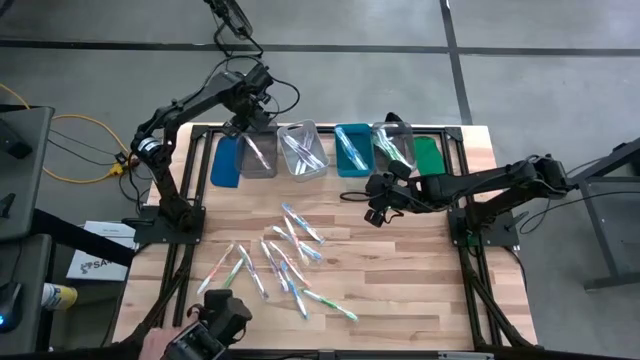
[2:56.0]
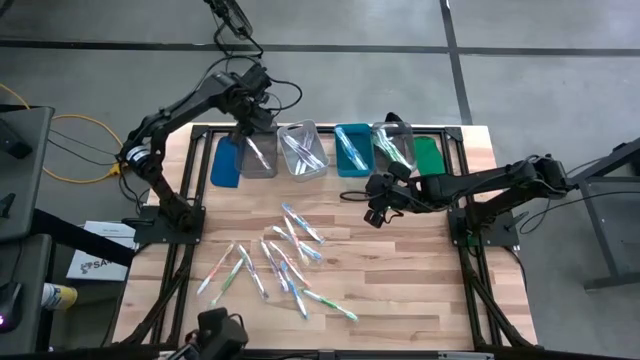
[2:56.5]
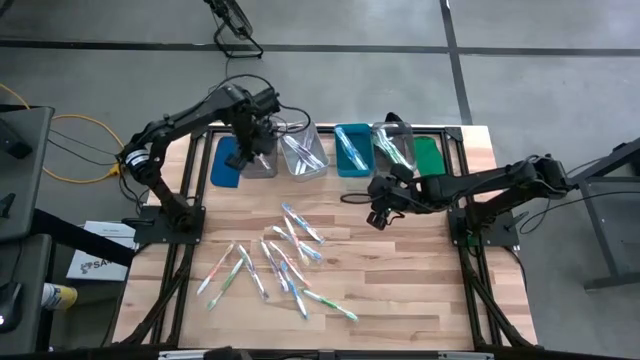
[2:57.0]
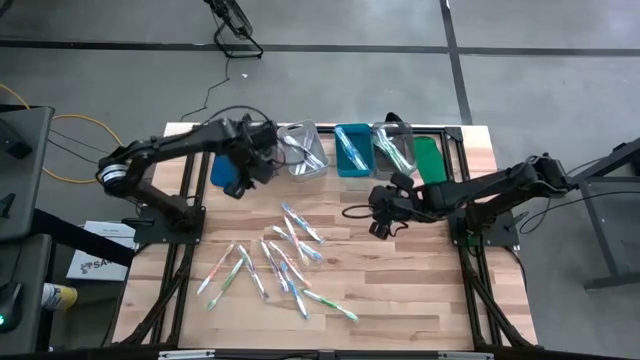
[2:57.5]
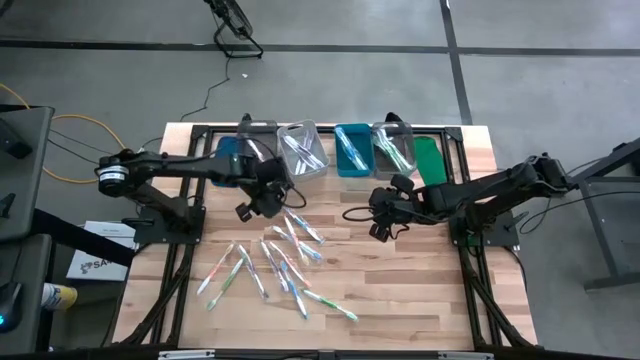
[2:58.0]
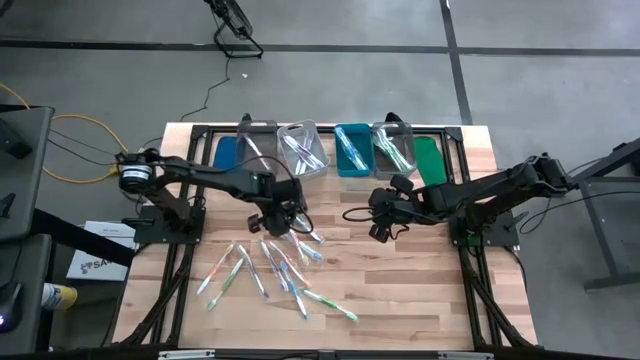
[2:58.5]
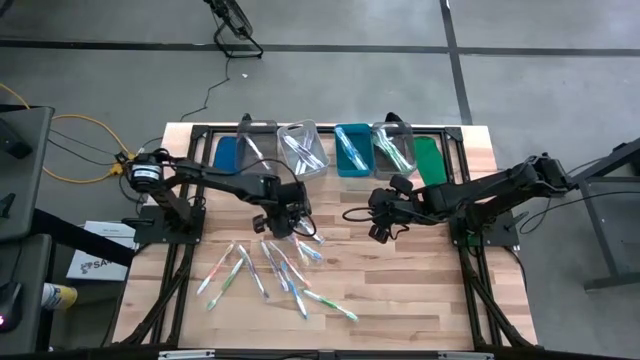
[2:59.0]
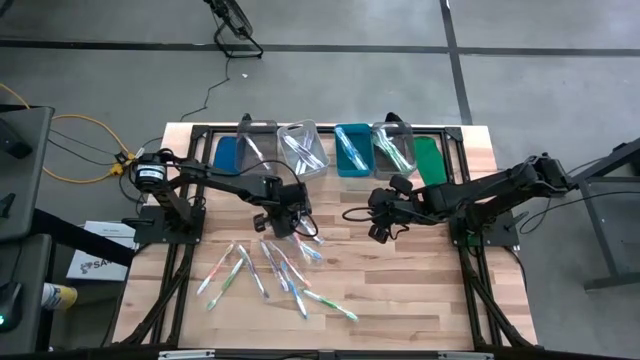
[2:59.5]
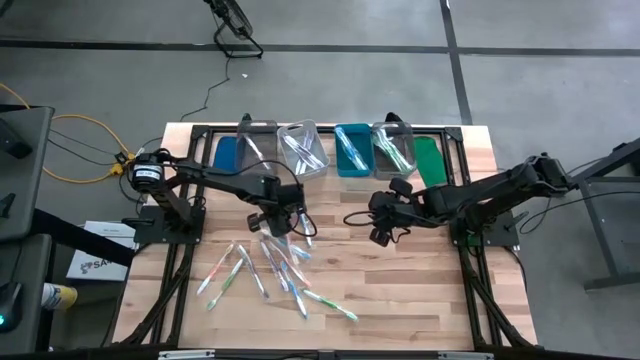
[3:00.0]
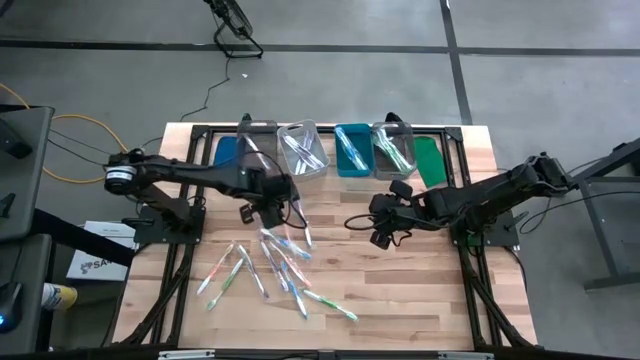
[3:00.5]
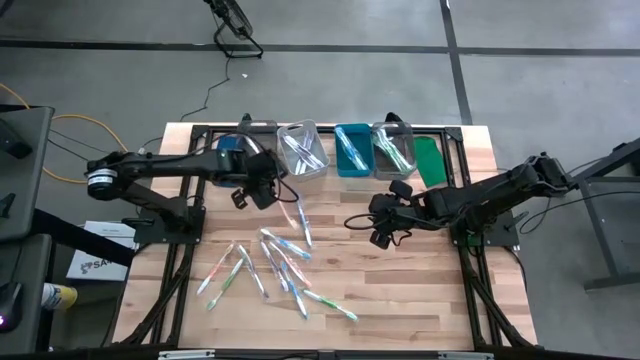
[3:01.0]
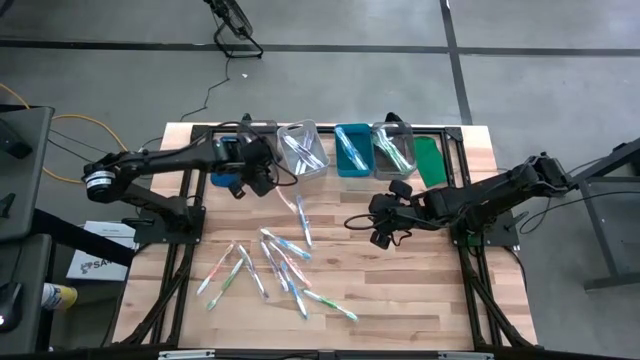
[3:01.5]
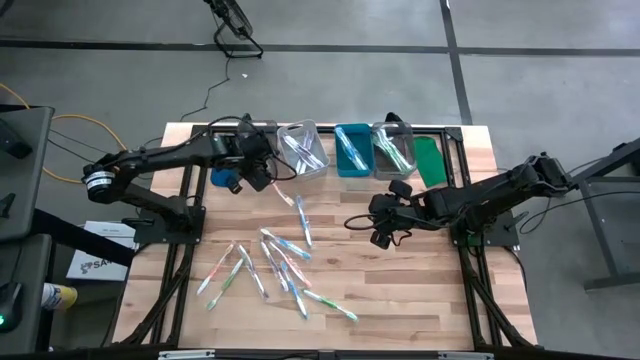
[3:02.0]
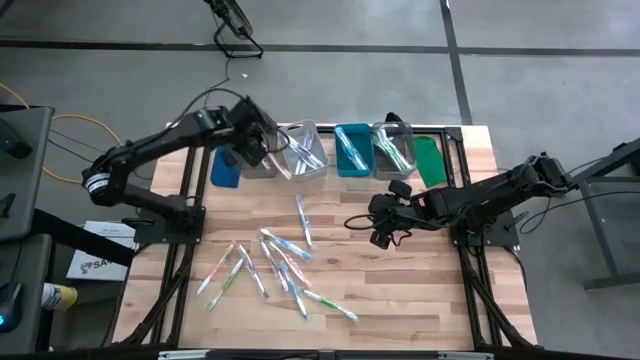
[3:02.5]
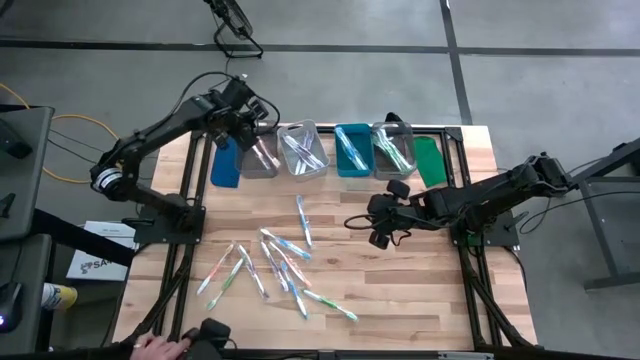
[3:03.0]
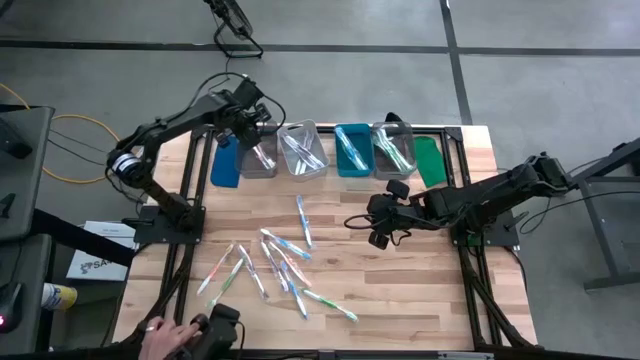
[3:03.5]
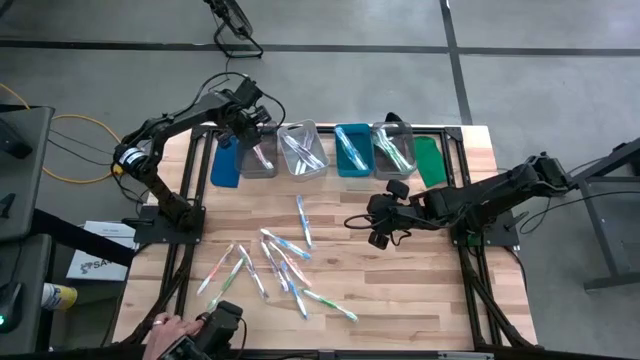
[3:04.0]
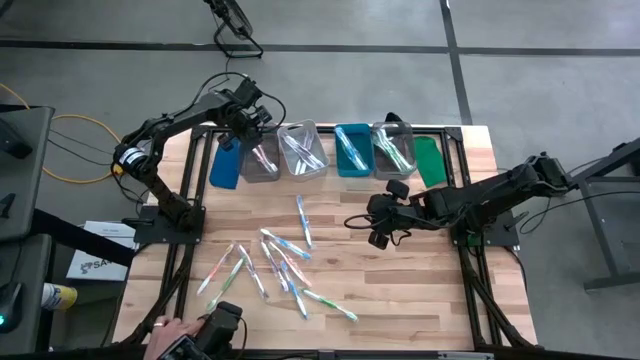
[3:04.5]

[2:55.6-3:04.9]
Task: Pick & Place Toothbrushes
Put the orange toothbrush into the left black bin

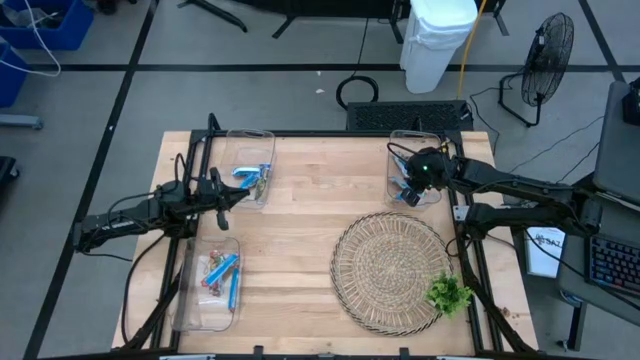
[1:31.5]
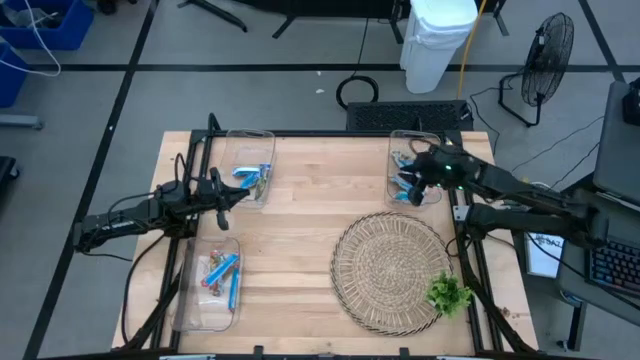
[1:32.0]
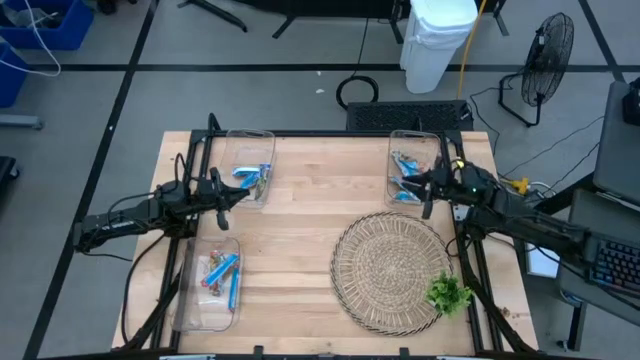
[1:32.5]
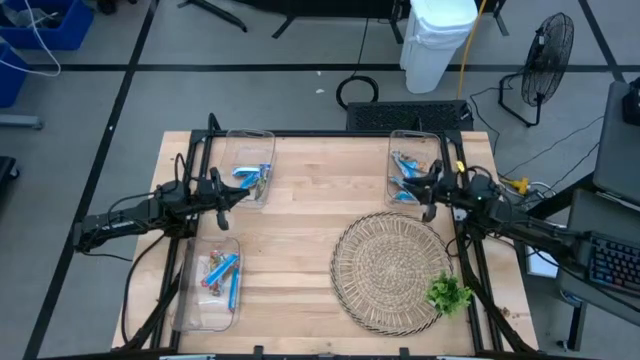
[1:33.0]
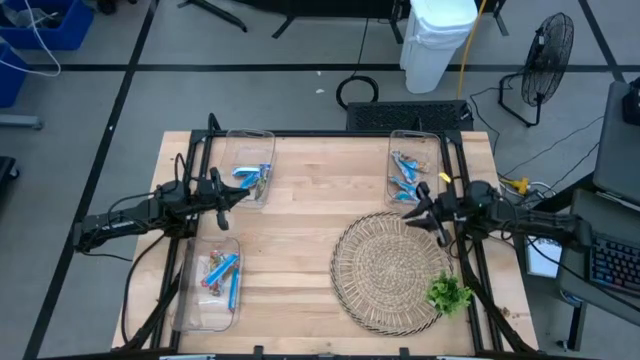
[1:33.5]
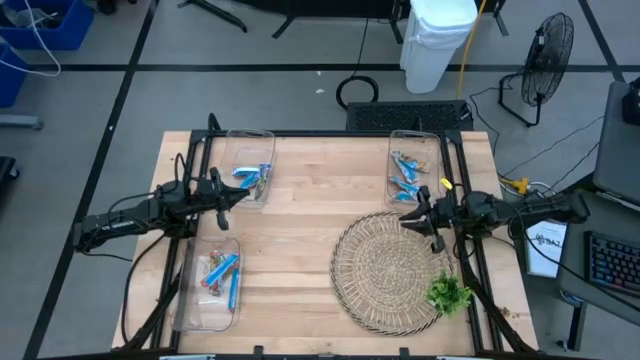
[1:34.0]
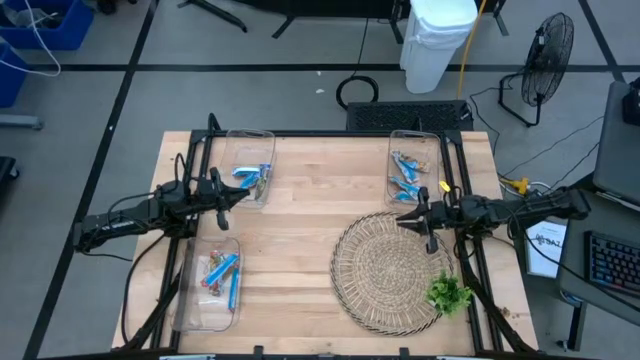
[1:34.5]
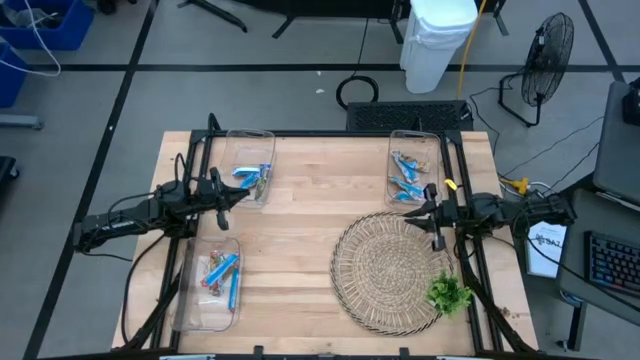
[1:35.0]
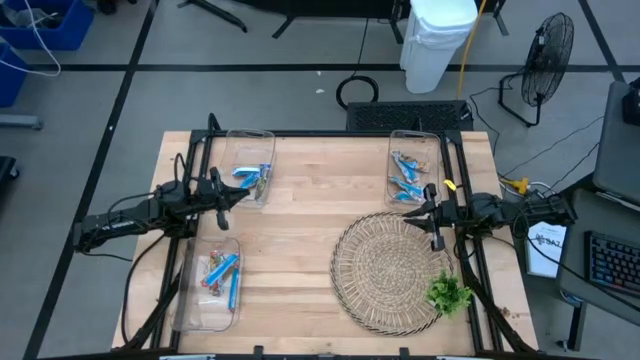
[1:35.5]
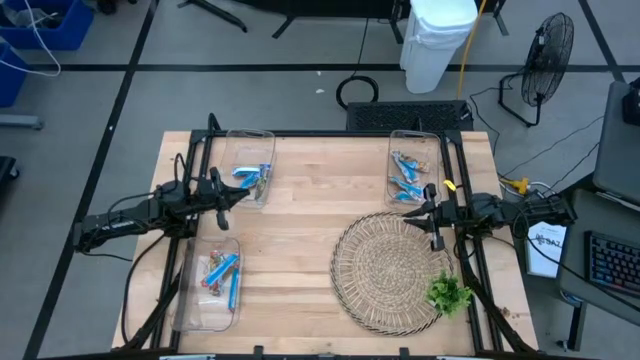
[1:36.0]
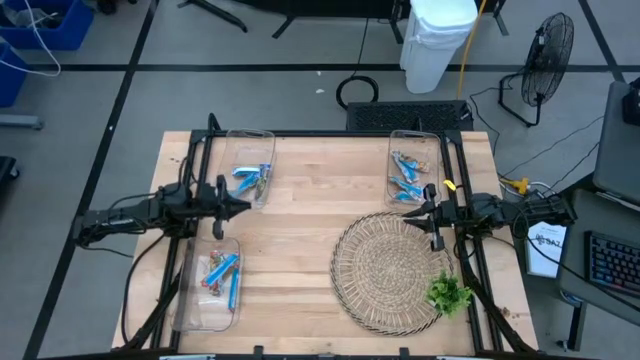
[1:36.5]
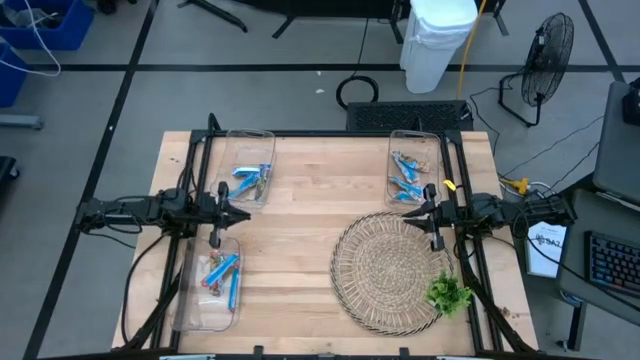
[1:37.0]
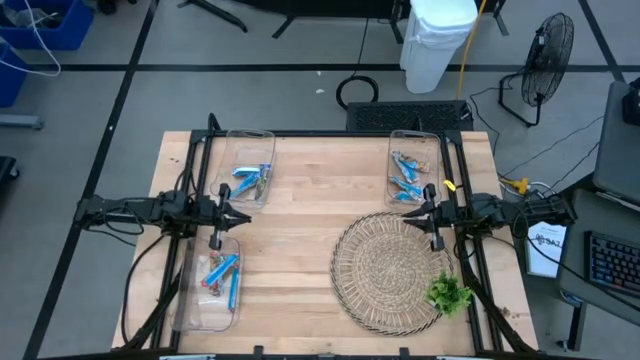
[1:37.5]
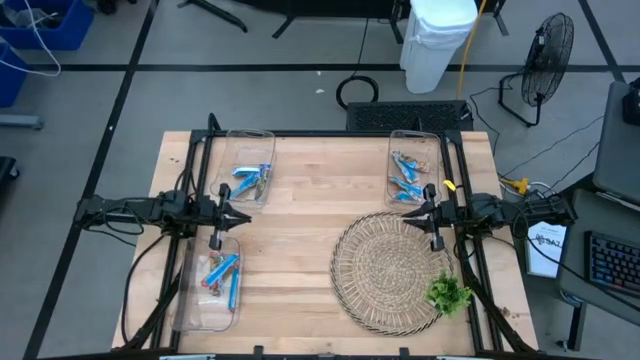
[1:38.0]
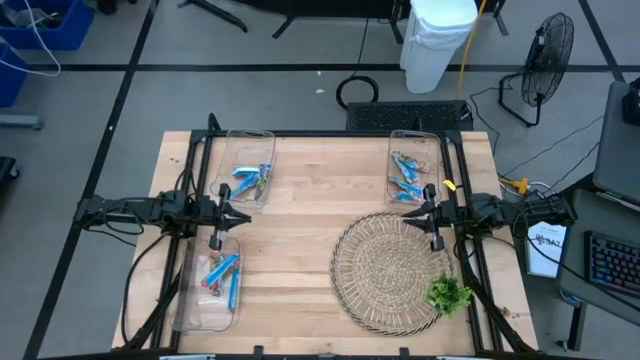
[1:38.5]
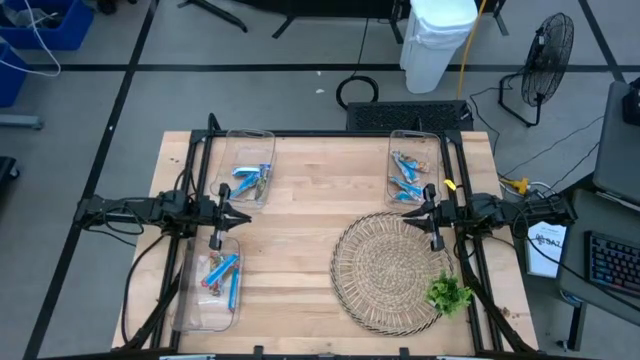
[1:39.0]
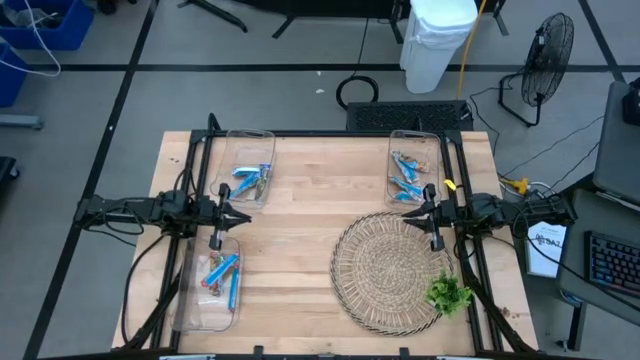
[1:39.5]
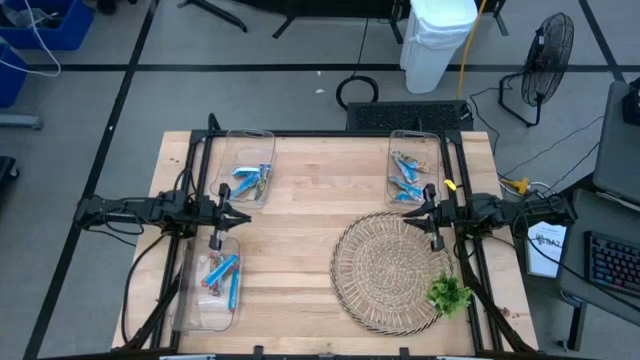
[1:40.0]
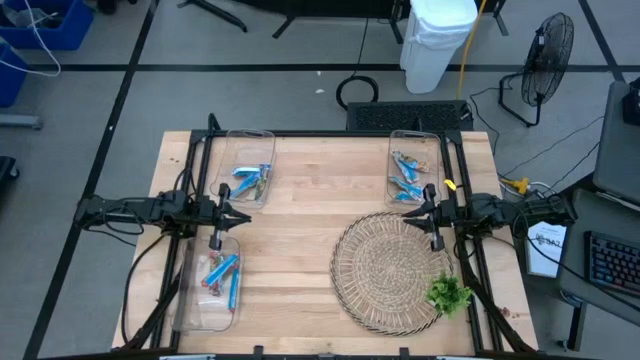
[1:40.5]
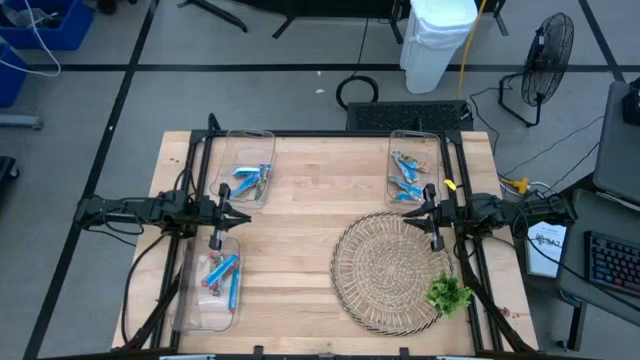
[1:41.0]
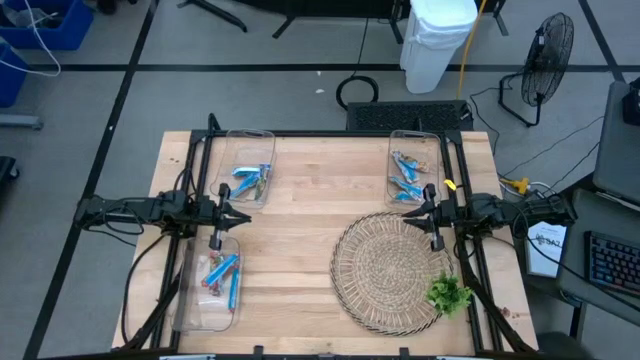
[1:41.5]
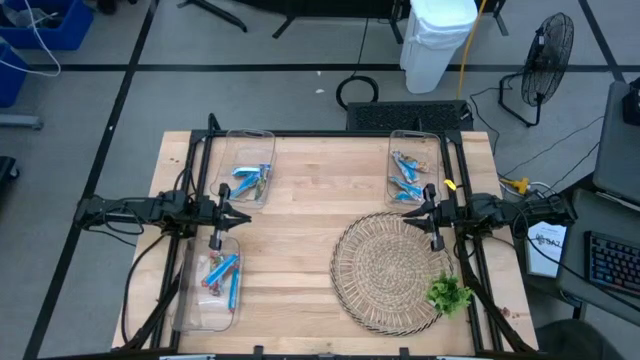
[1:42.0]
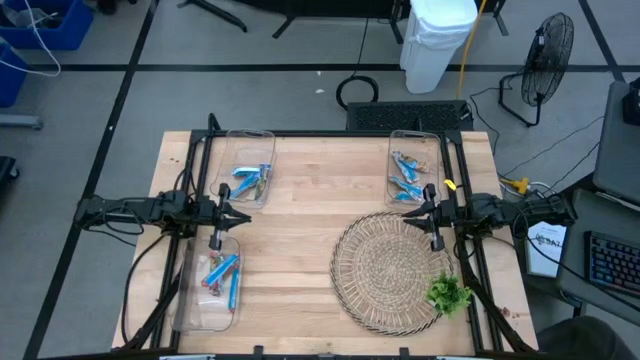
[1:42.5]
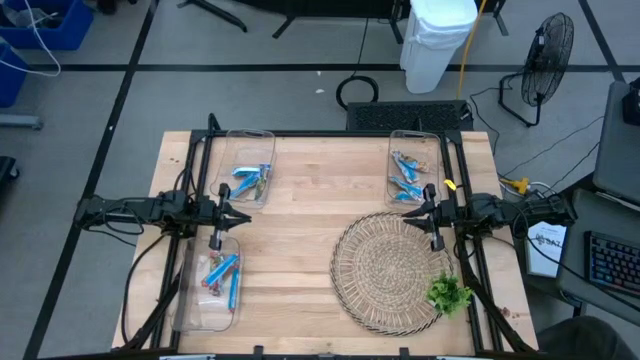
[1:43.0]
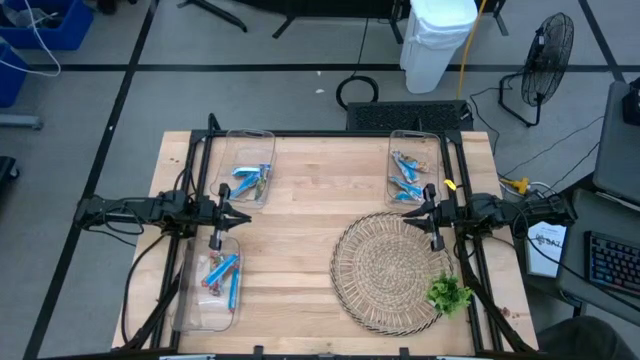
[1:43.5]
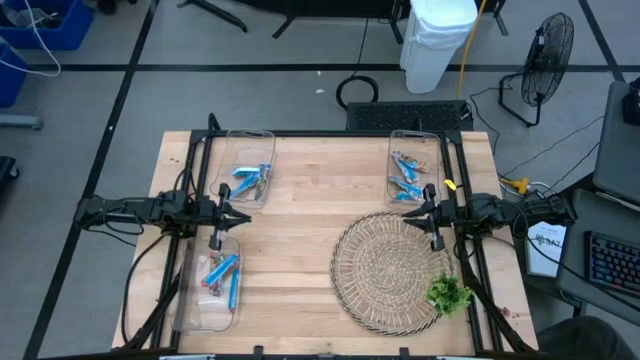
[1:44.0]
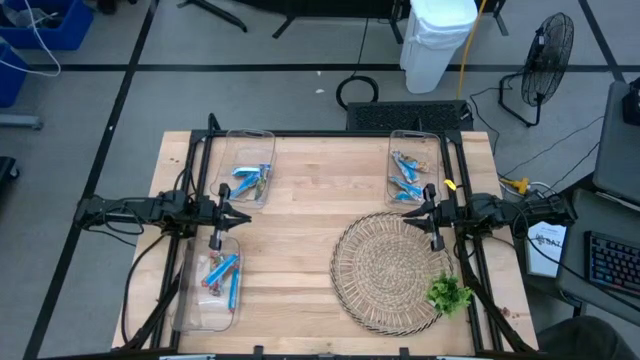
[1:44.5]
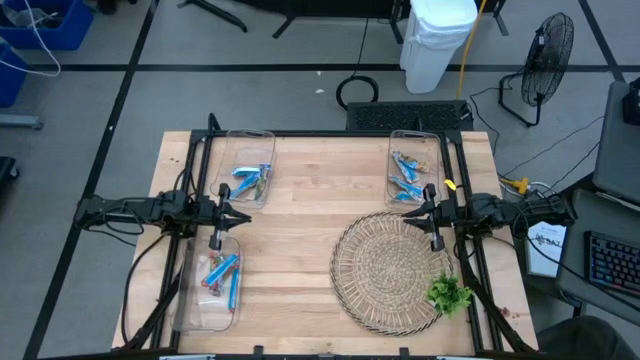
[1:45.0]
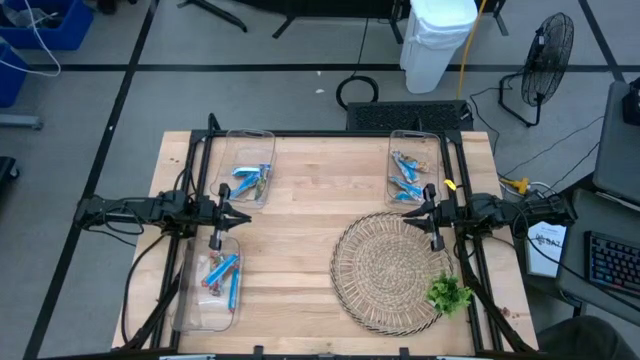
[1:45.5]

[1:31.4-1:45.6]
Task: Pick and place Granola Bars by type
Return to Home Position
